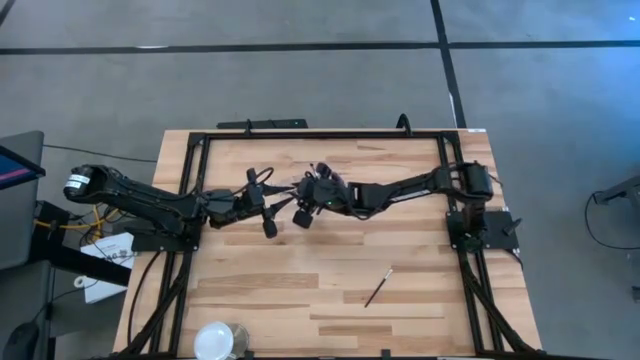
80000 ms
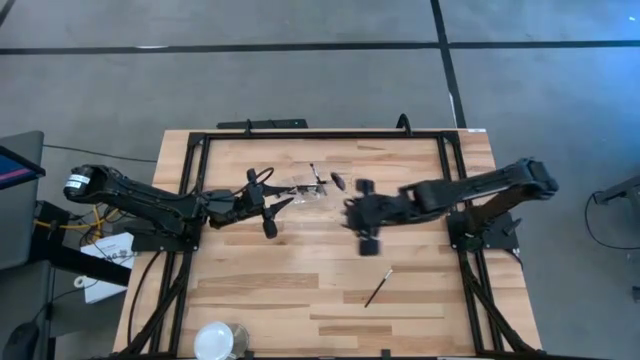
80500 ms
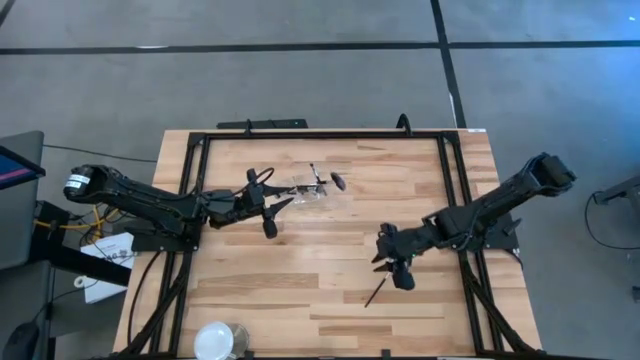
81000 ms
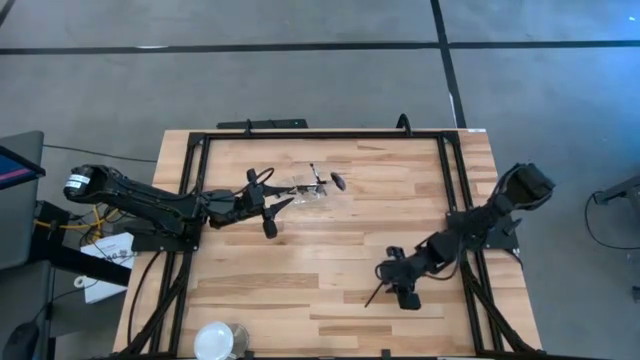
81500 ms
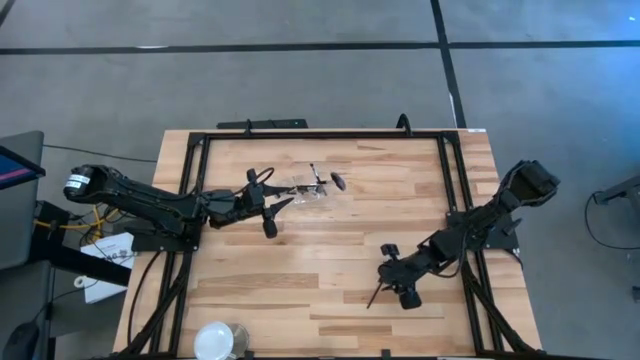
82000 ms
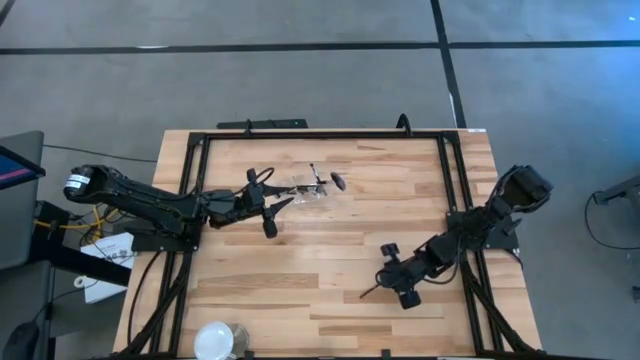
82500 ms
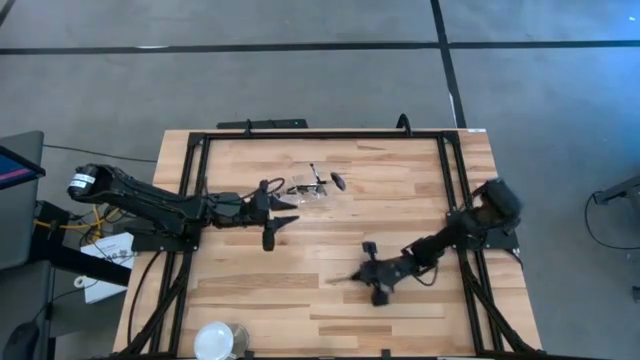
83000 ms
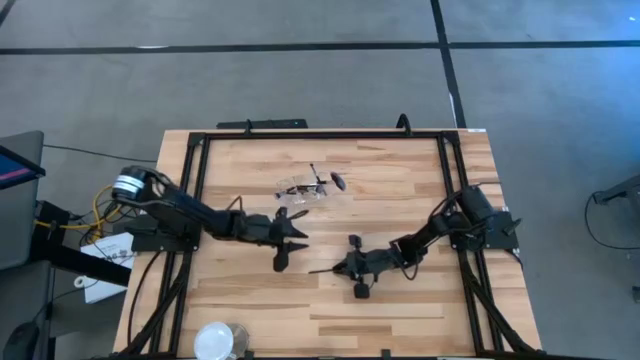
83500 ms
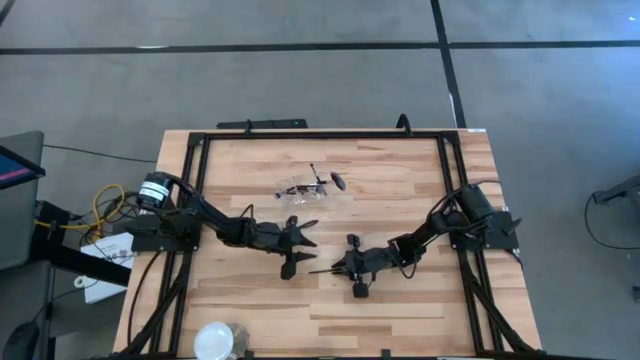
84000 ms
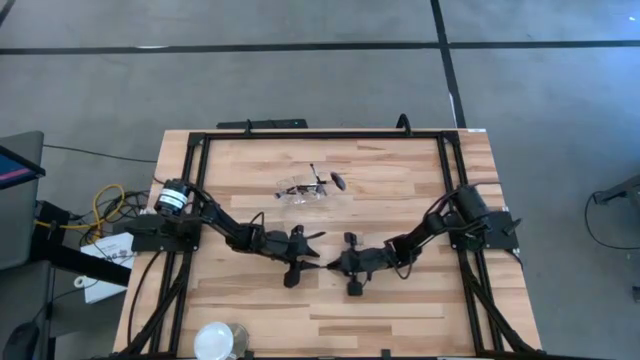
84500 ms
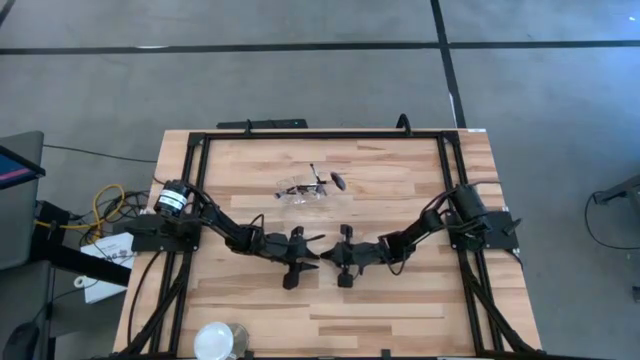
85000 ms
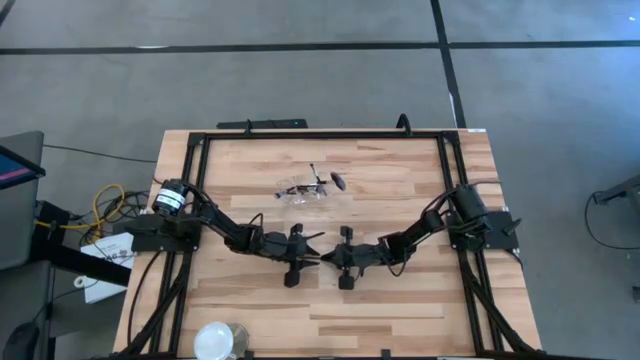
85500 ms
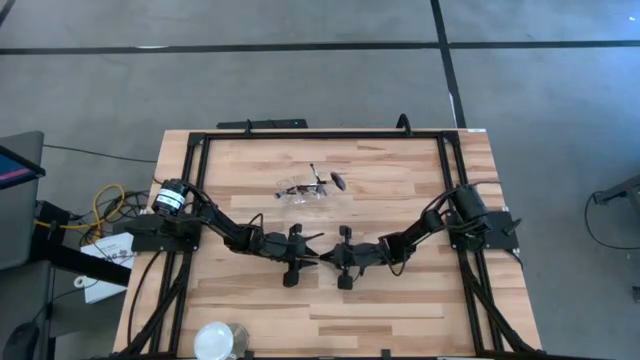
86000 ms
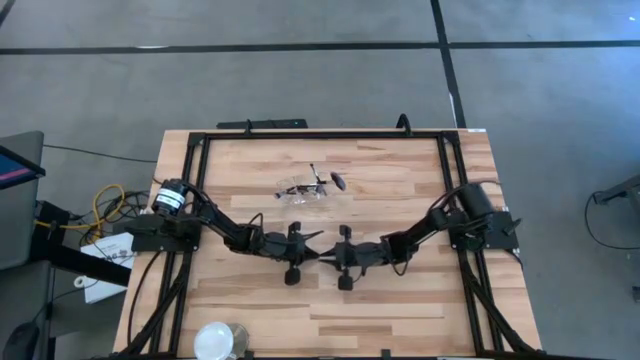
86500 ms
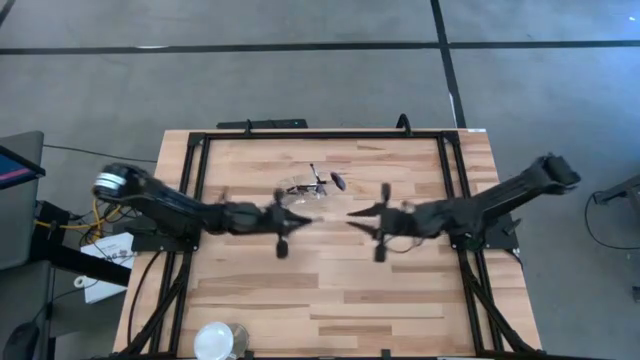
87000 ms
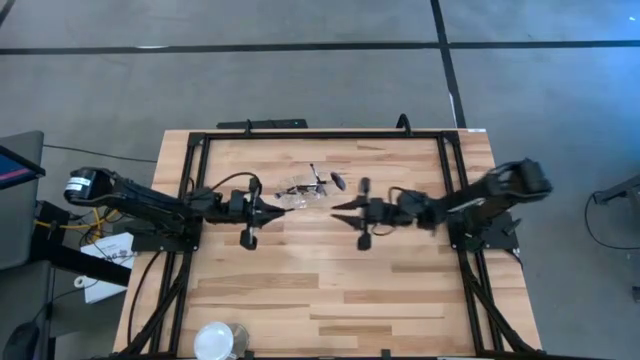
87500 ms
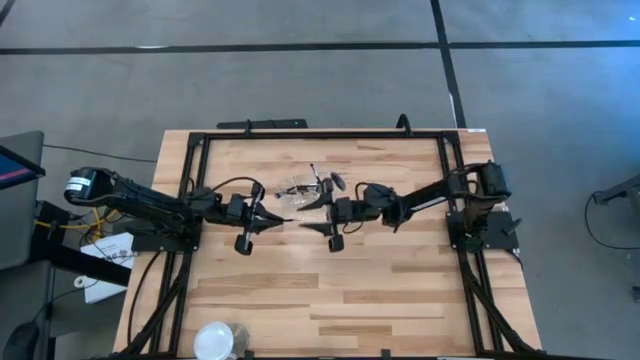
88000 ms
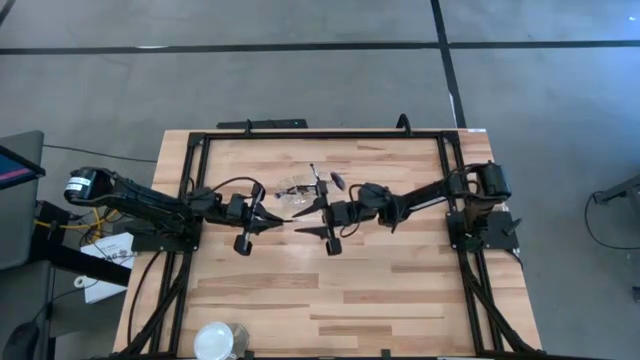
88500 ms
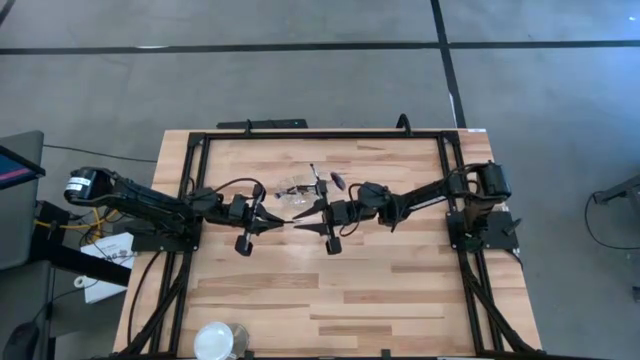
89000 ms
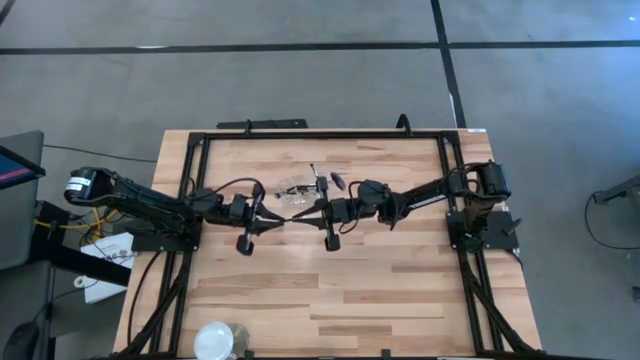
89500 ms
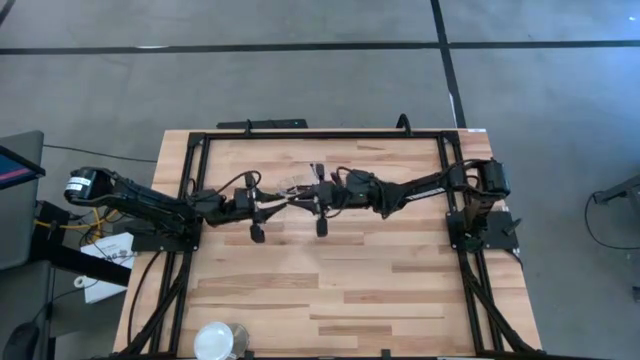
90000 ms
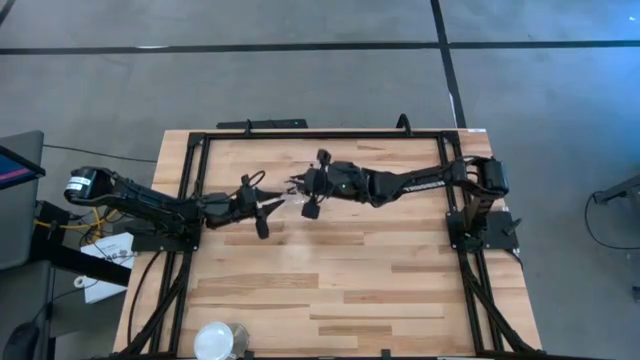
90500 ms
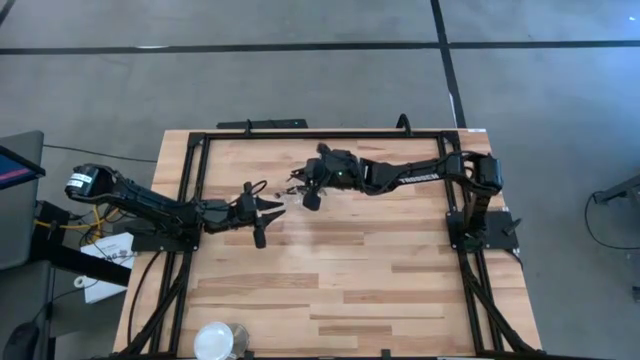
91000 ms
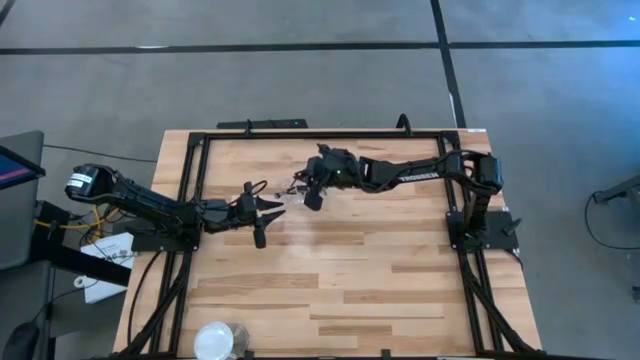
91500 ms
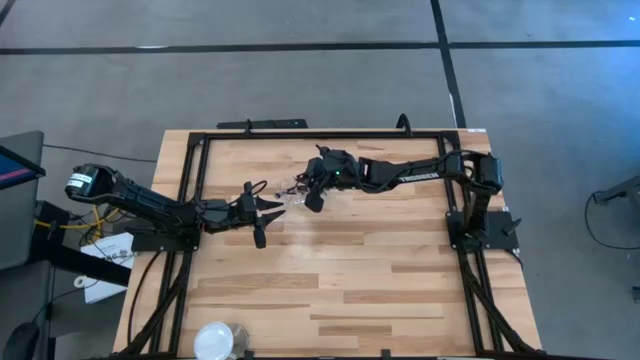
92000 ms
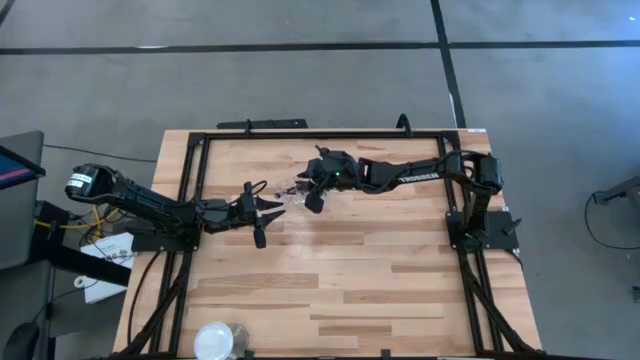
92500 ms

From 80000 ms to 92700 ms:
Task: Put items in baskets/containers
Put the black eyeshadow brush into the transparent organizer

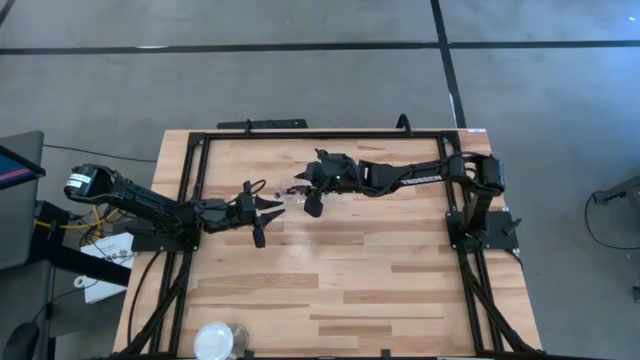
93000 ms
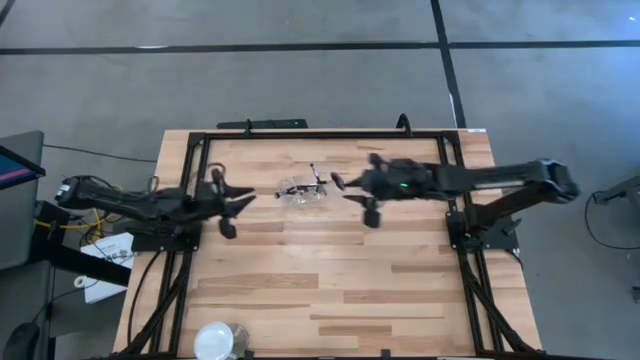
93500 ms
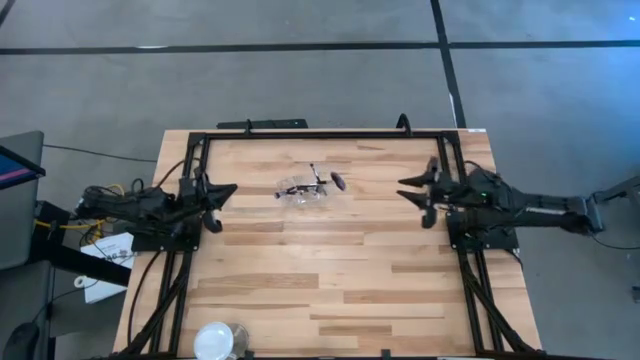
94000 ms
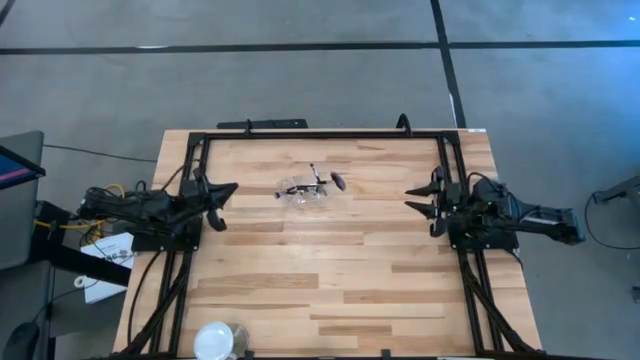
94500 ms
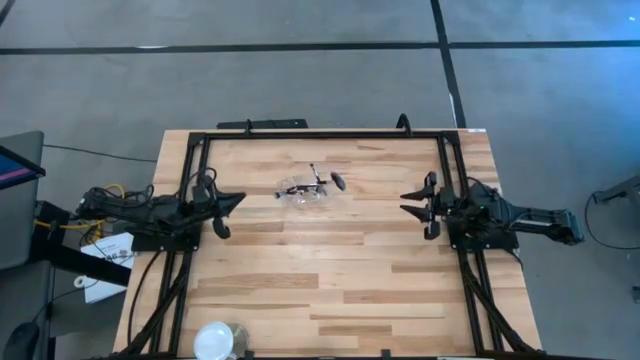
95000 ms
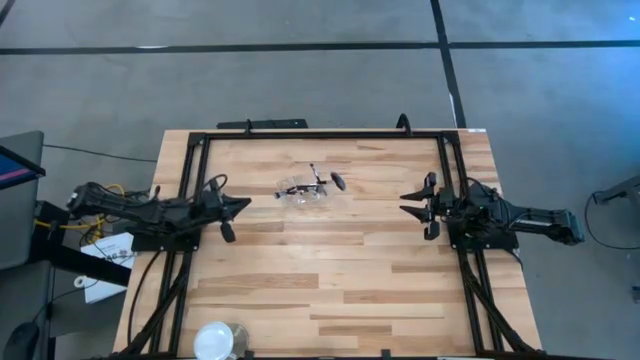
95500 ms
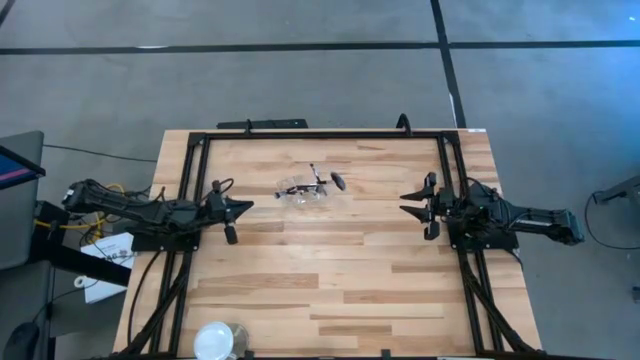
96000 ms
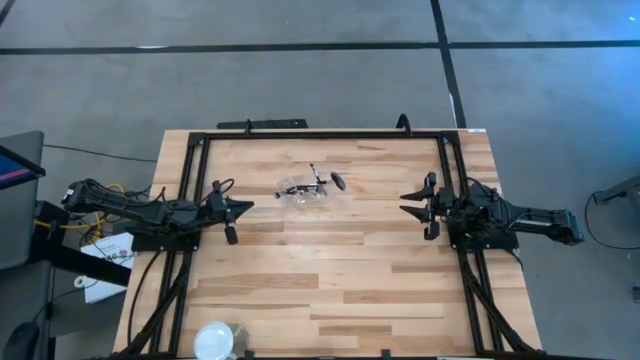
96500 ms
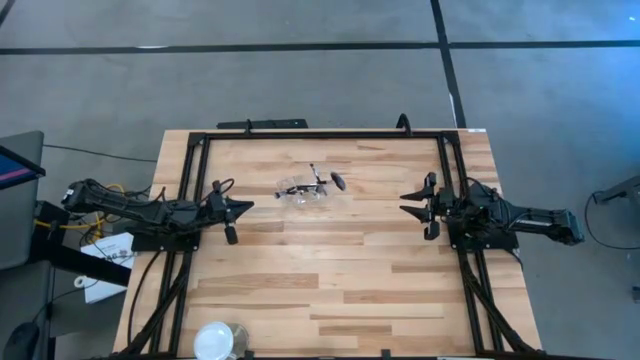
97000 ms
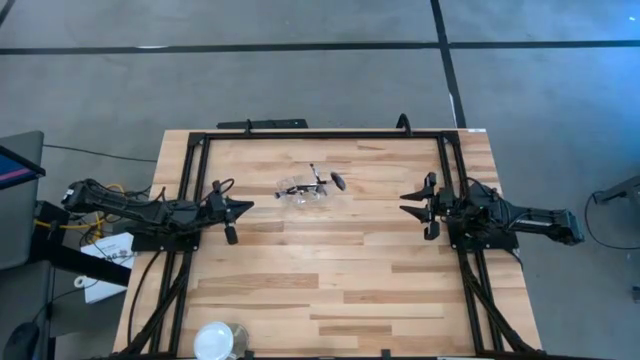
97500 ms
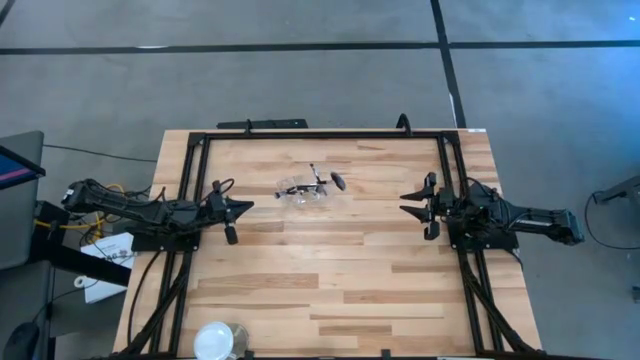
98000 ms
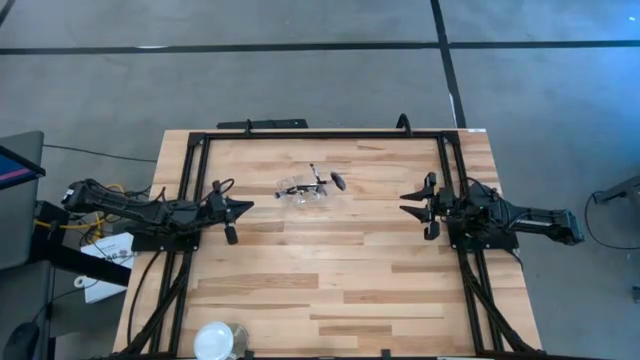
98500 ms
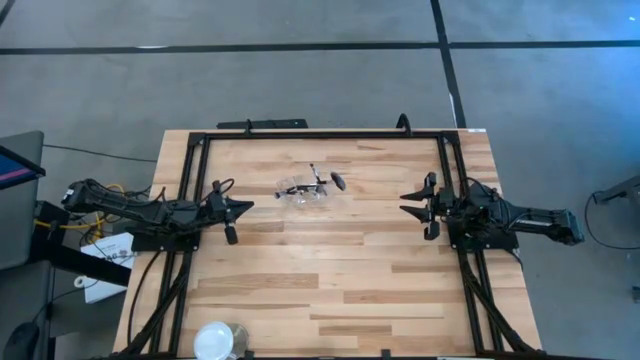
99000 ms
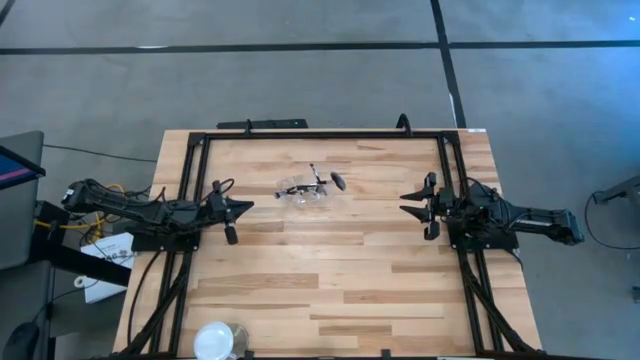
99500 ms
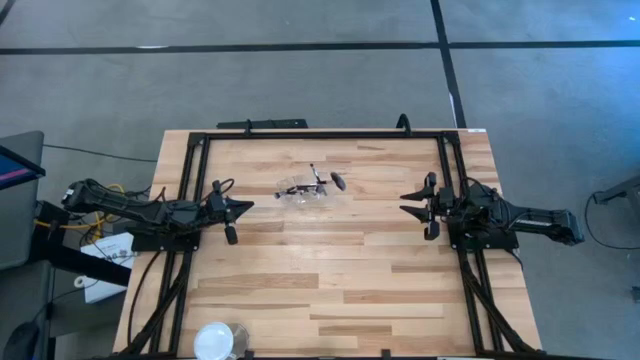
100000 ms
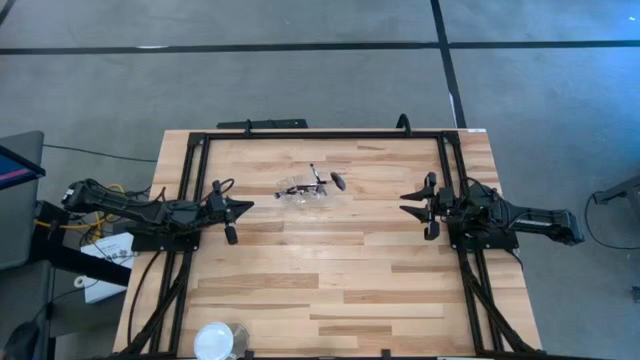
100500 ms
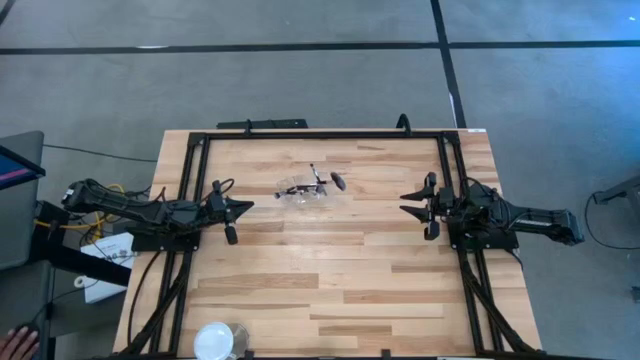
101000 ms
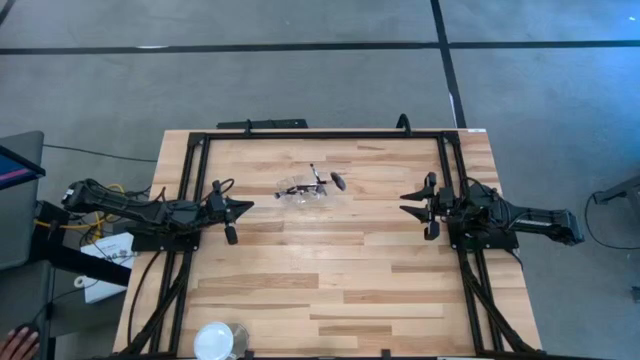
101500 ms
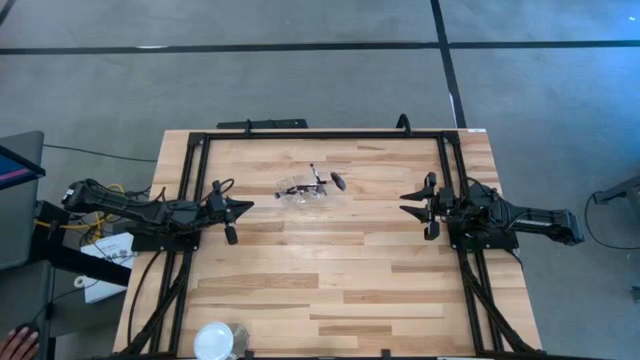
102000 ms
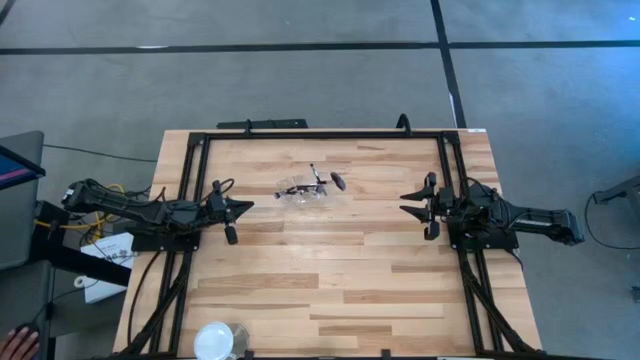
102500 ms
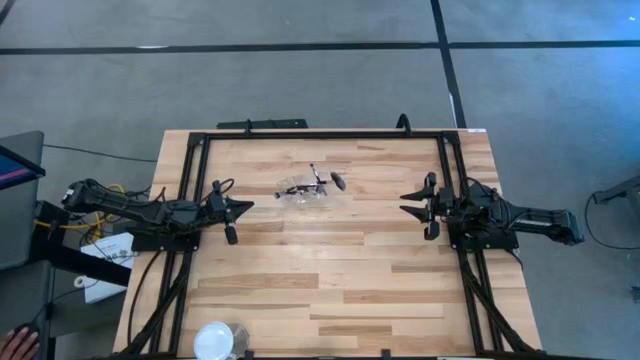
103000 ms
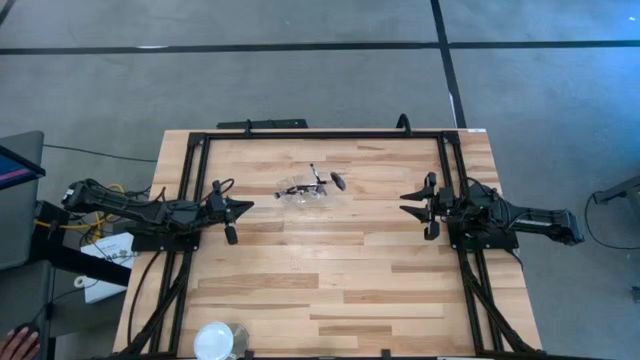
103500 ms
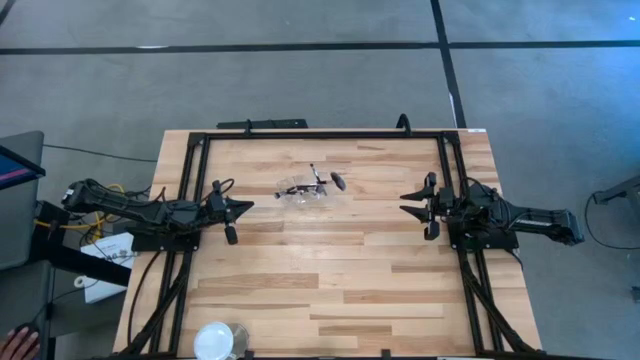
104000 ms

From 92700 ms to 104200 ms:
Return to Home Position
